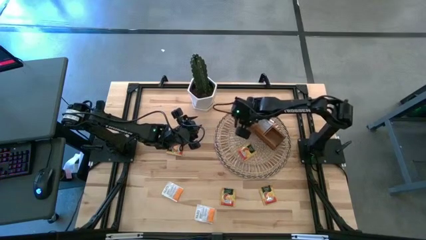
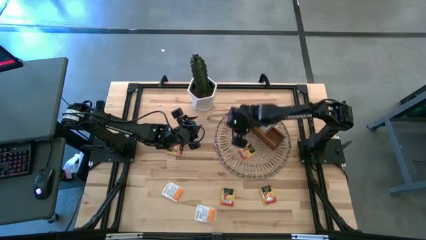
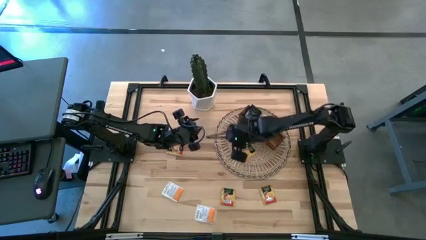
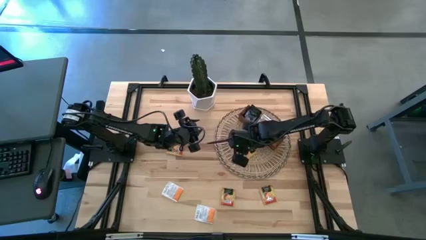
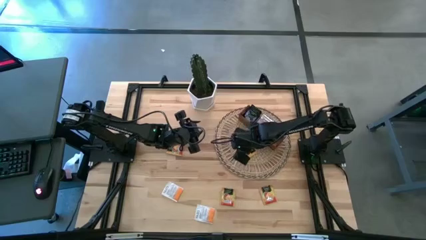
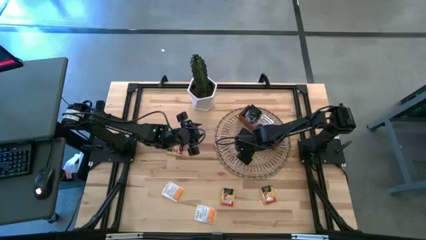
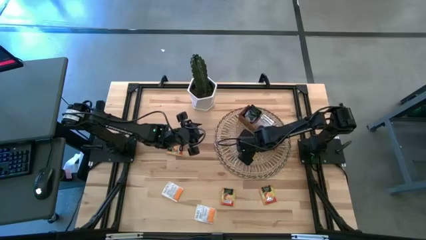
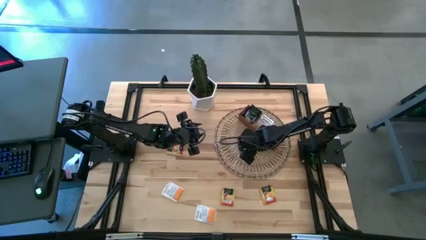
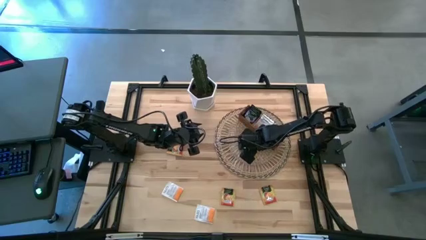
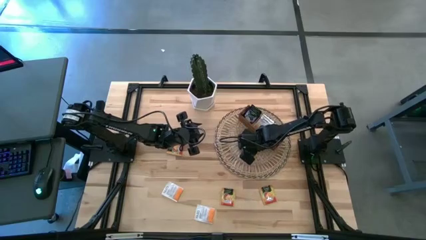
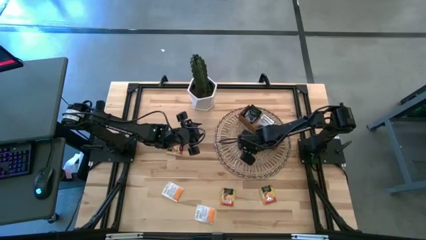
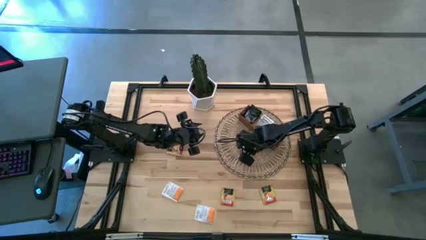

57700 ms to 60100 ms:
Task: Pick & Place Tea
Put the orange tea bag into the right section of the wooden organizer

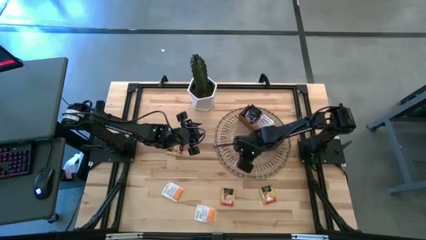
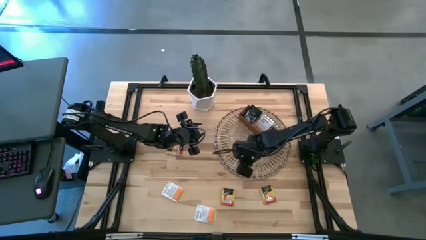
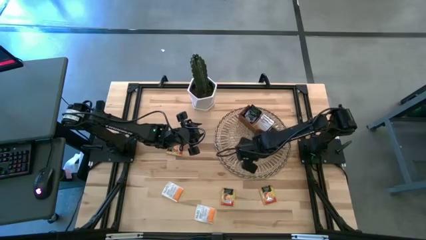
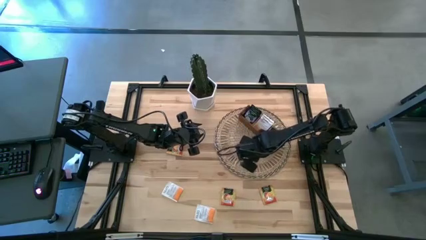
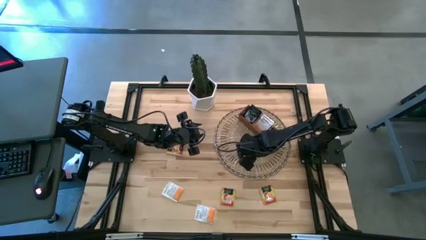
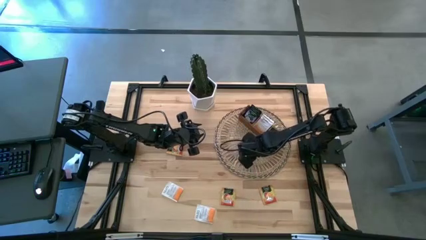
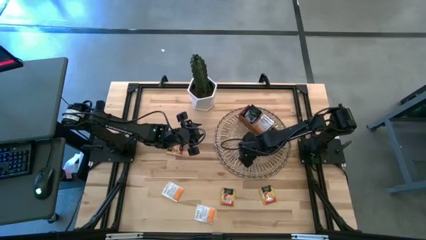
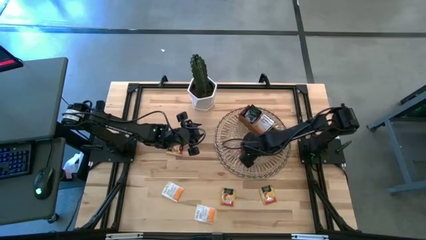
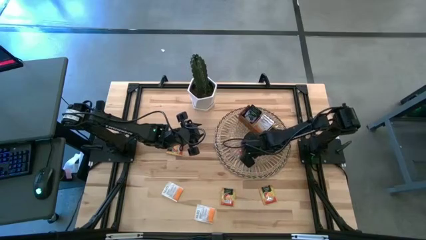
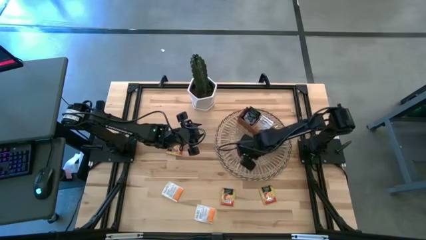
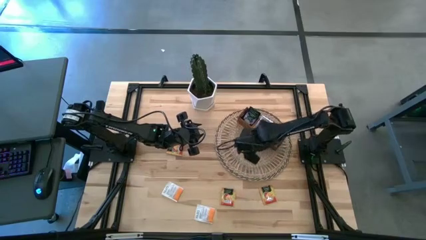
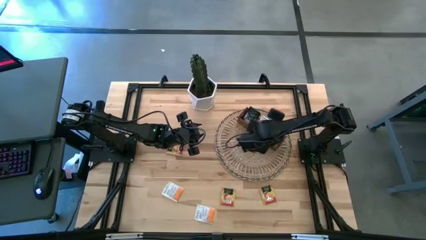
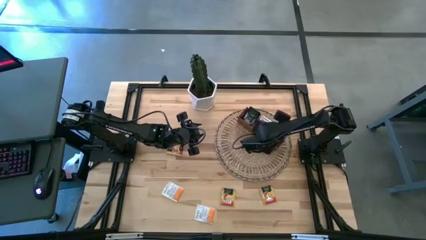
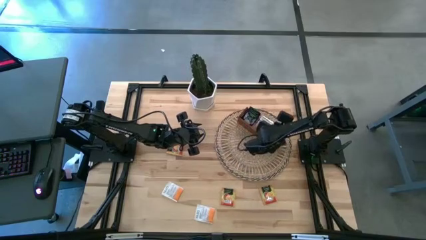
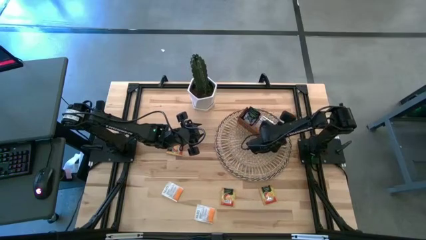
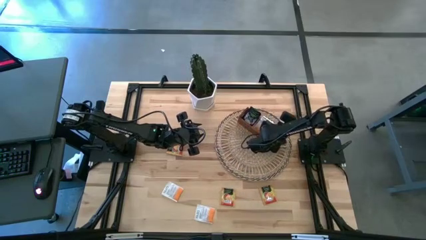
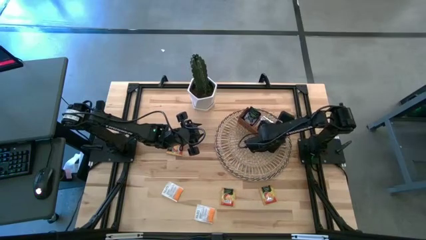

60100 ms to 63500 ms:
Put the orange tea bag into the right section of the wooden organizer

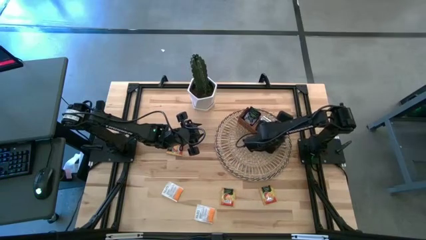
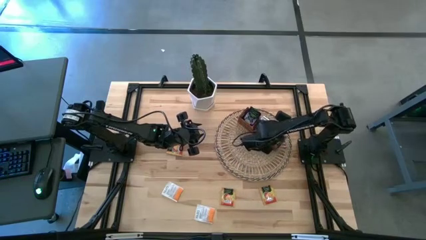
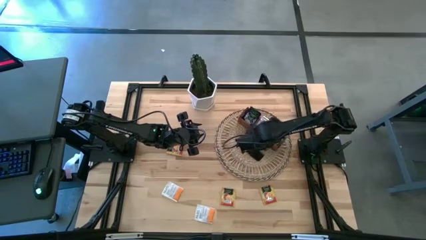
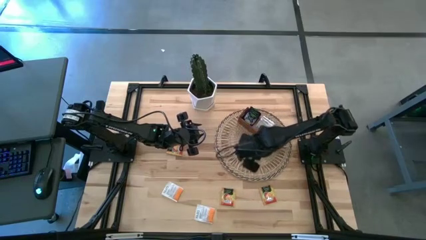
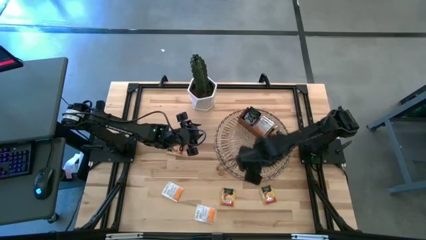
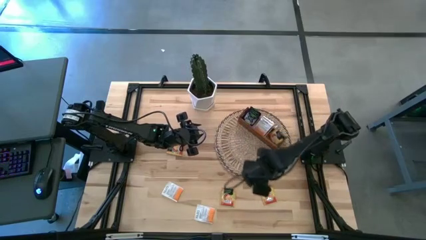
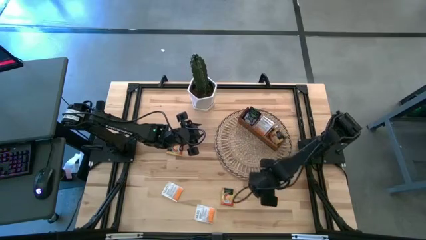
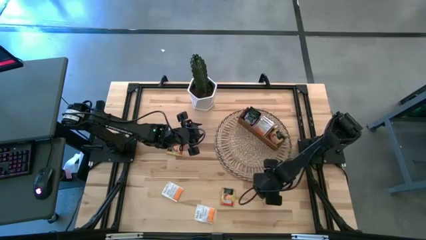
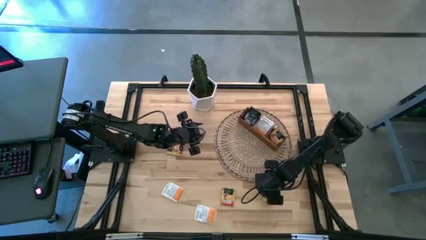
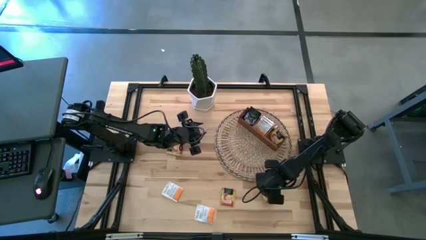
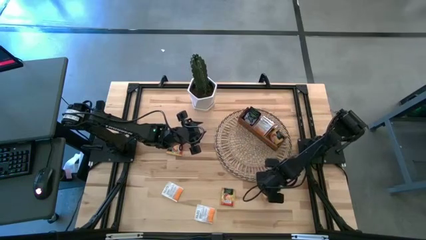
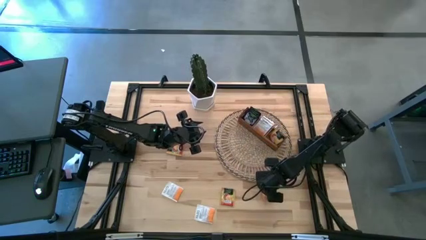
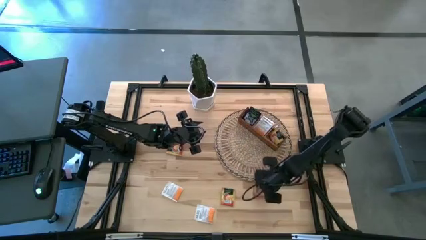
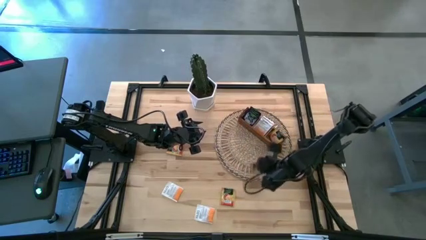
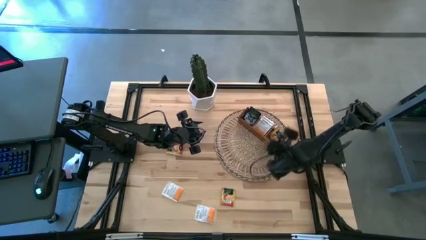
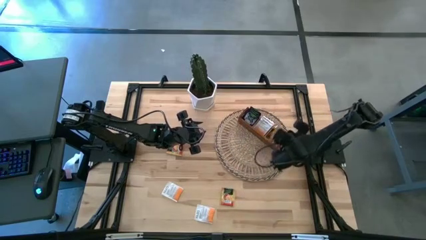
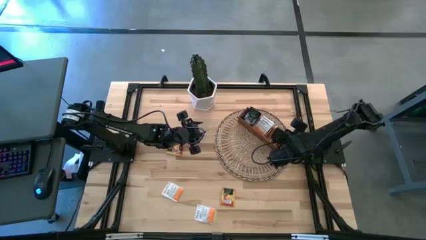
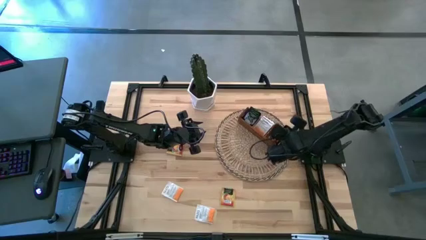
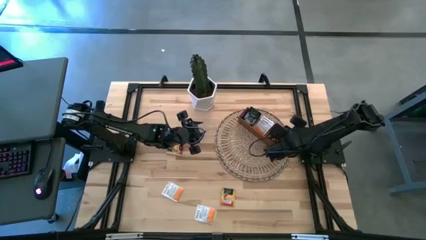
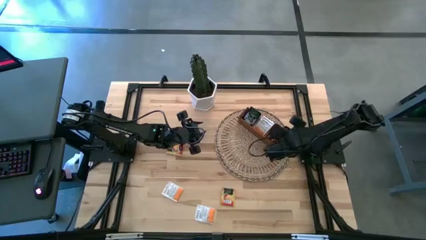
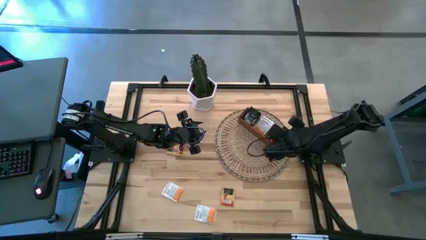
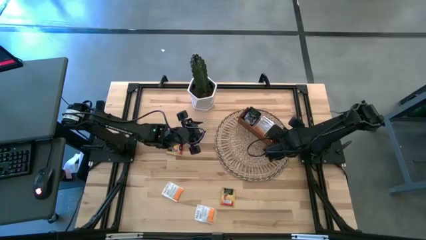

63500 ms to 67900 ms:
Put the orange tea bag into the right section of the wooden organizer

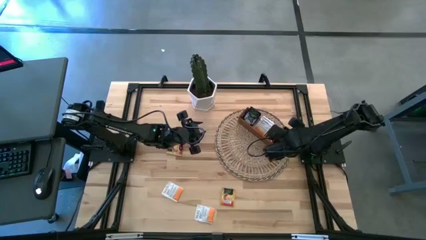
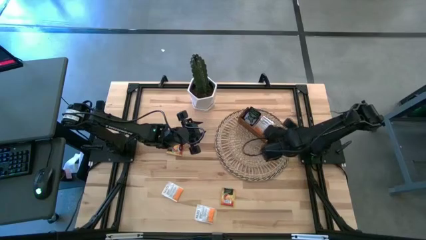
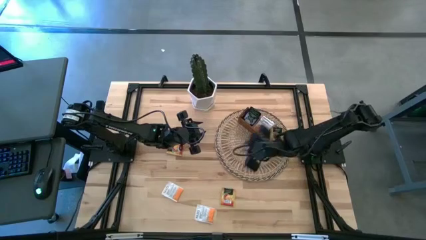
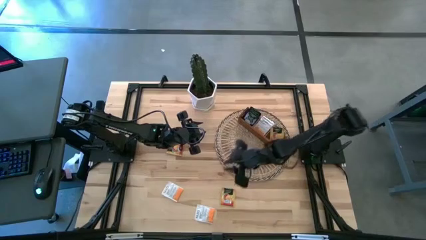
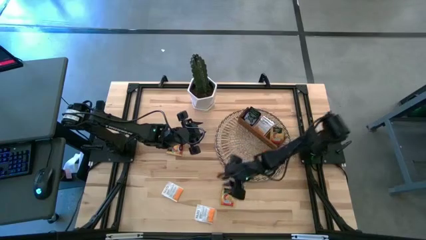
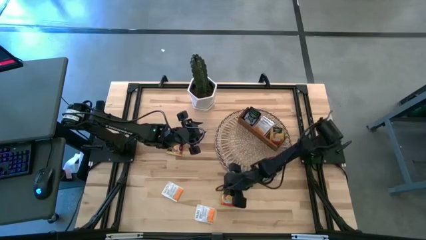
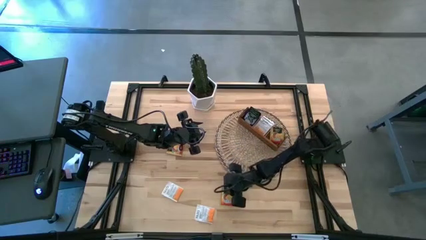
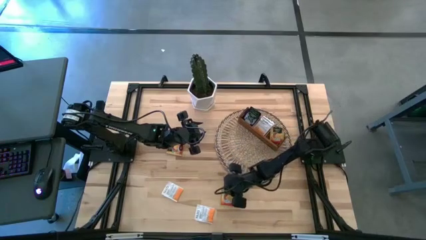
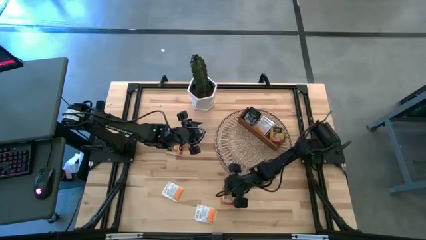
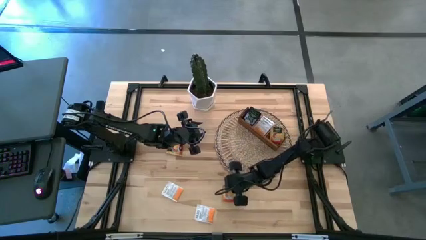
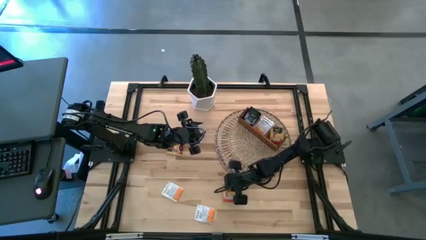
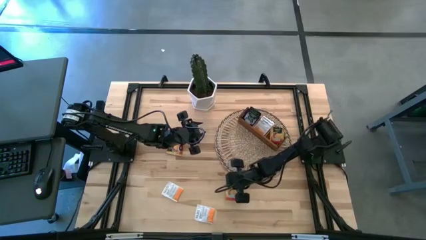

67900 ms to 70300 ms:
Put the orange tea bag into the right section of the wooden organizer

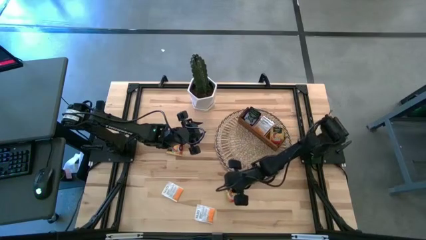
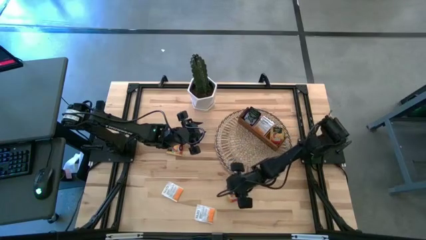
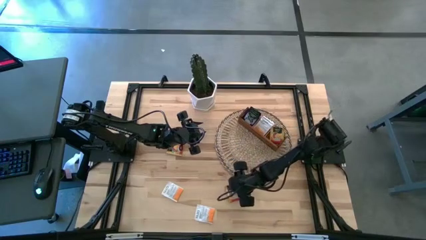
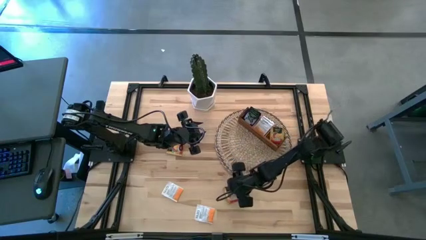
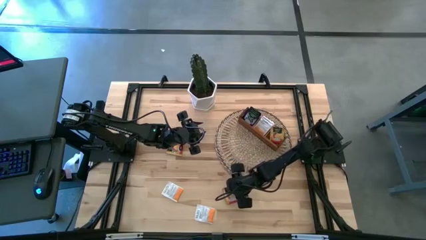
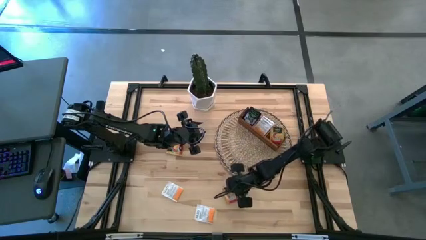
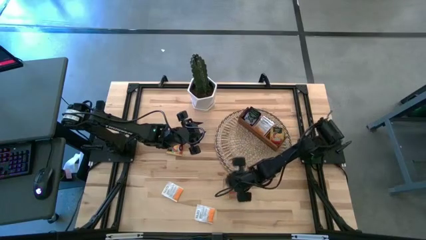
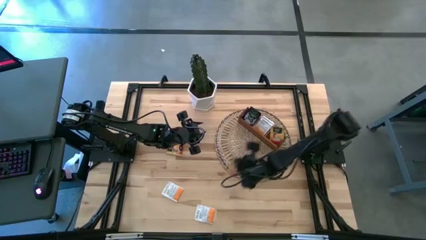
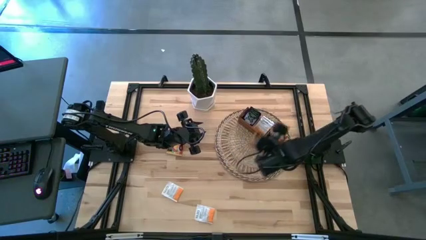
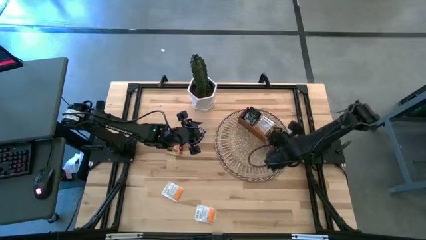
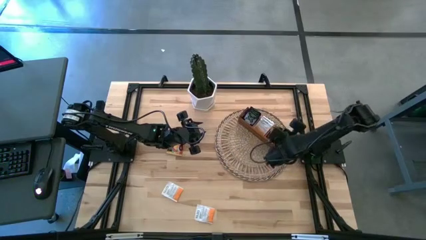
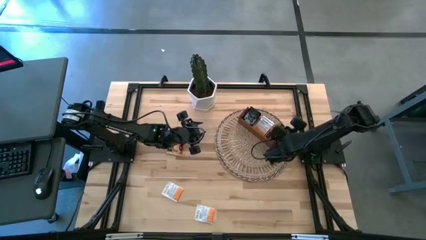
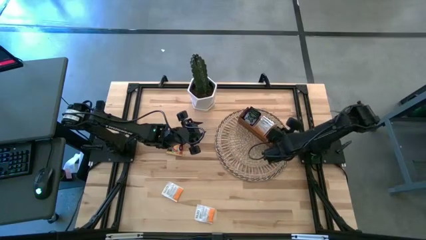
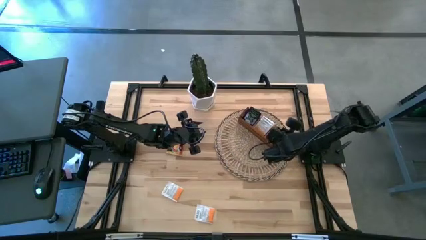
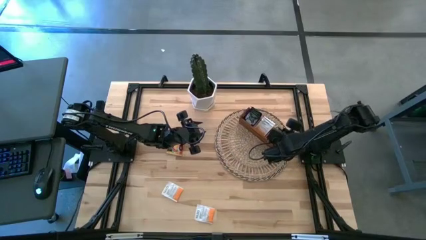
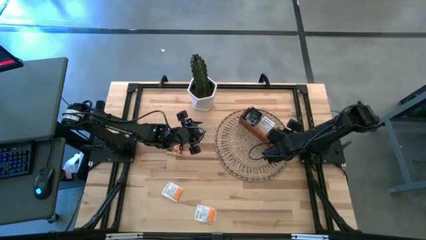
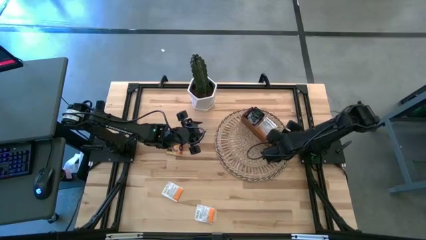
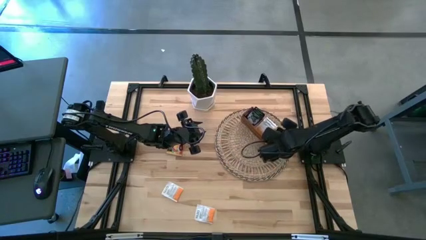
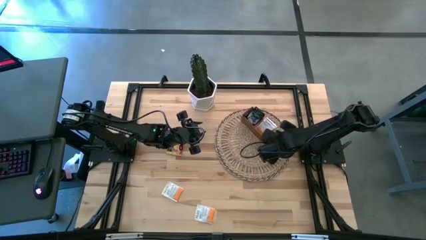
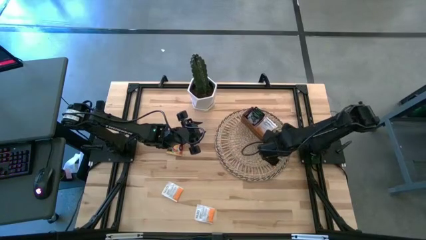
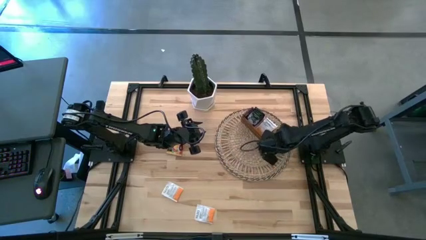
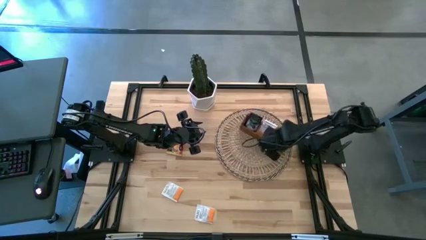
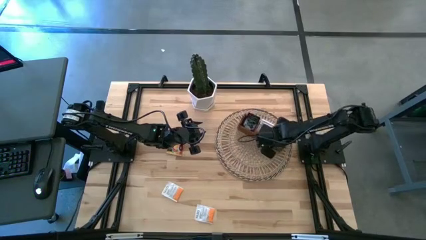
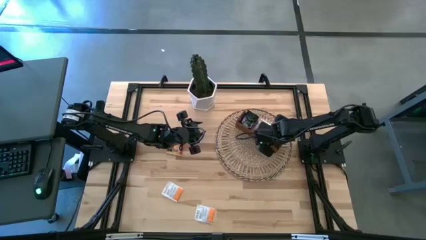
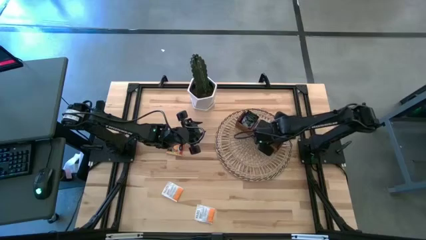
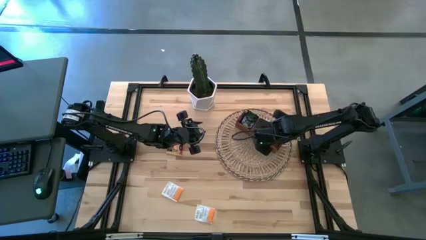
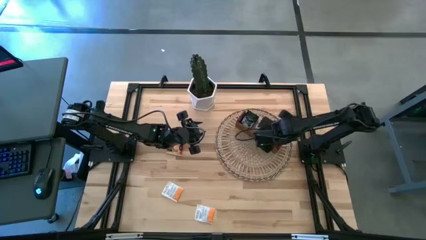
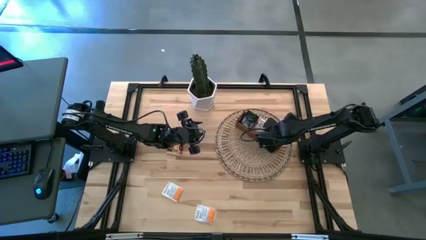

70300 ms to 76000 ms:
Put the orange tea bag into the right section of the wooden organizer
